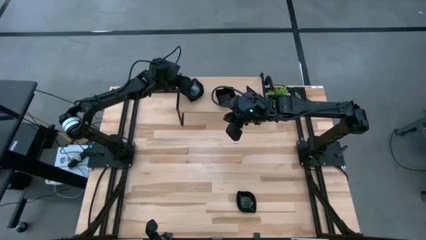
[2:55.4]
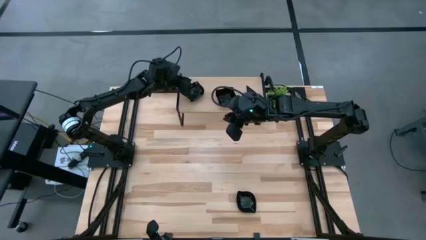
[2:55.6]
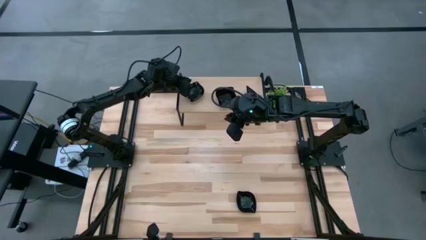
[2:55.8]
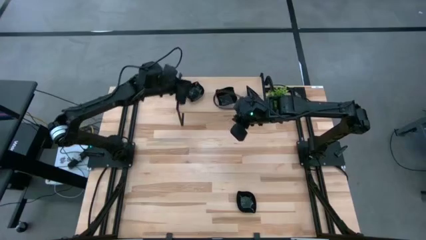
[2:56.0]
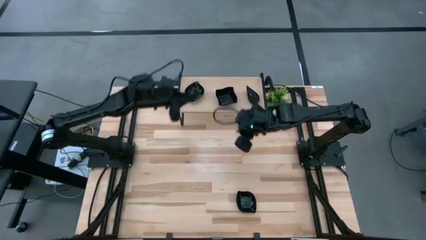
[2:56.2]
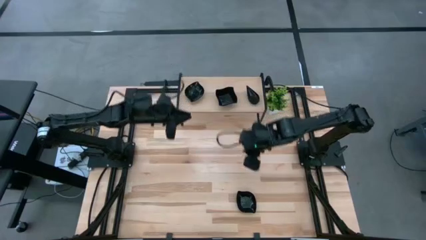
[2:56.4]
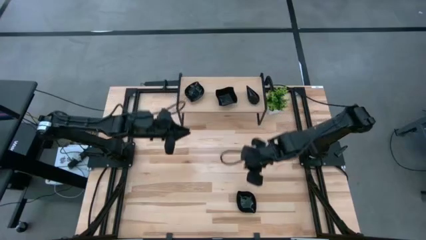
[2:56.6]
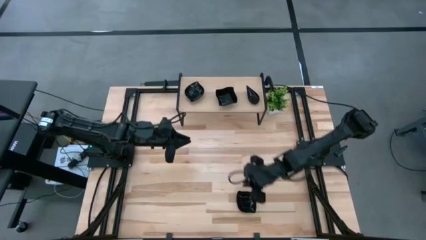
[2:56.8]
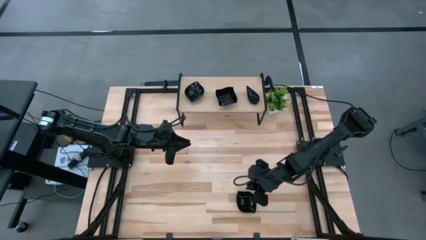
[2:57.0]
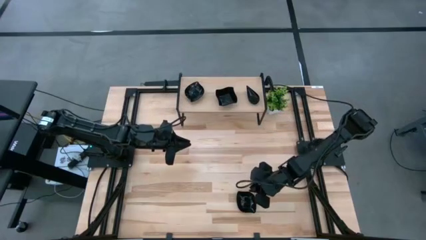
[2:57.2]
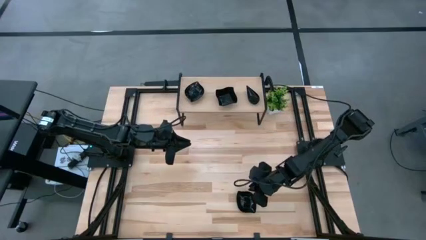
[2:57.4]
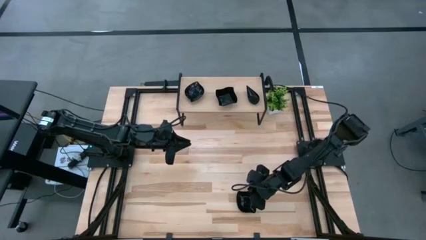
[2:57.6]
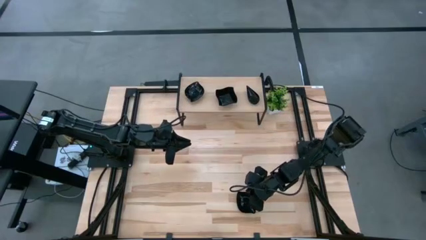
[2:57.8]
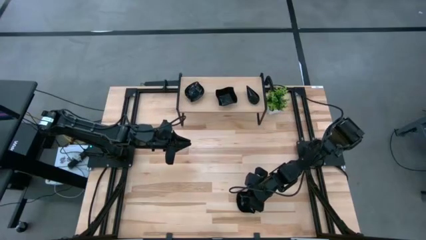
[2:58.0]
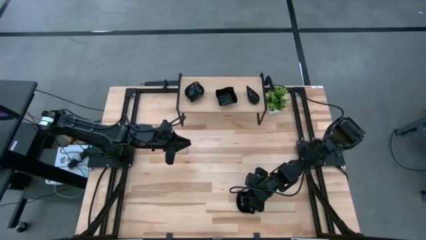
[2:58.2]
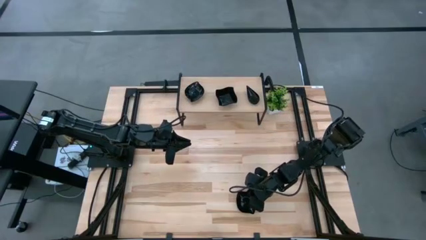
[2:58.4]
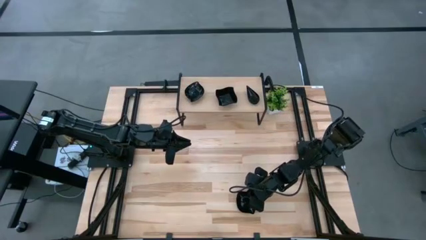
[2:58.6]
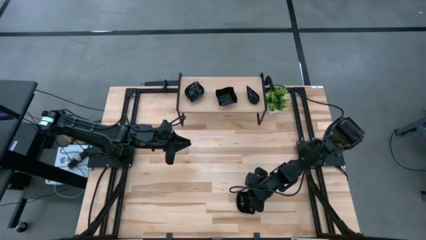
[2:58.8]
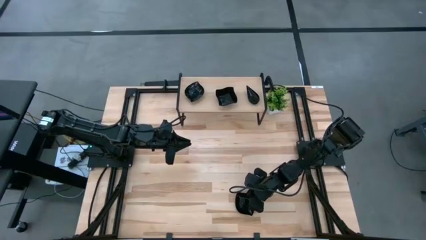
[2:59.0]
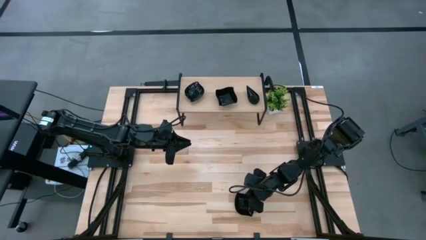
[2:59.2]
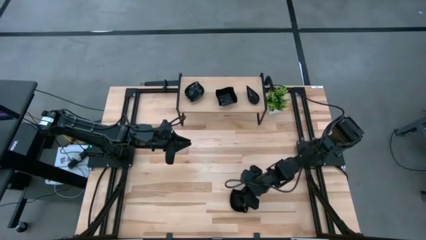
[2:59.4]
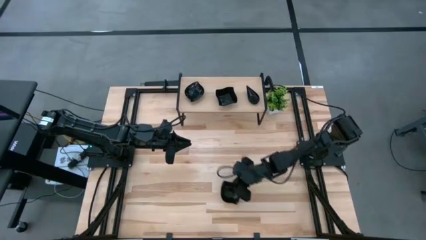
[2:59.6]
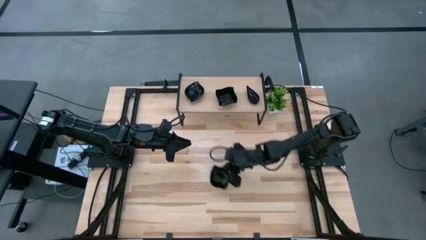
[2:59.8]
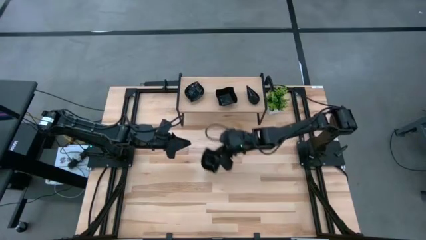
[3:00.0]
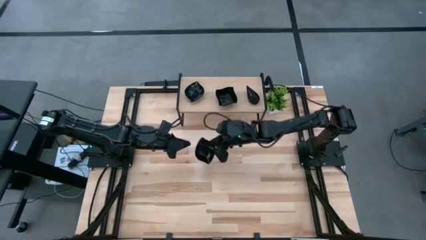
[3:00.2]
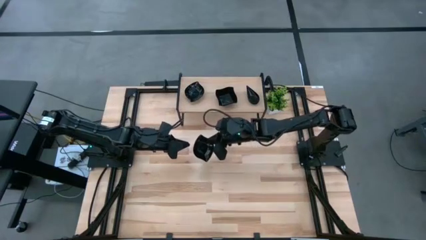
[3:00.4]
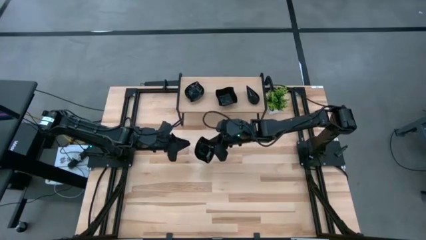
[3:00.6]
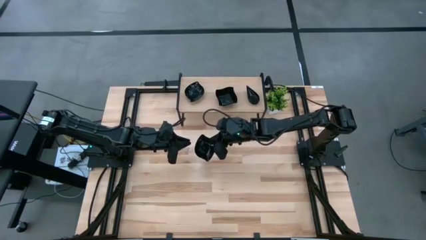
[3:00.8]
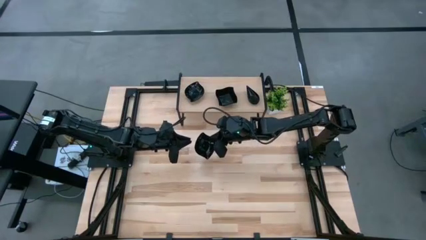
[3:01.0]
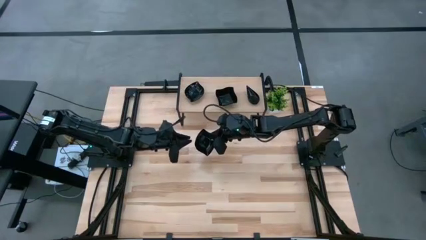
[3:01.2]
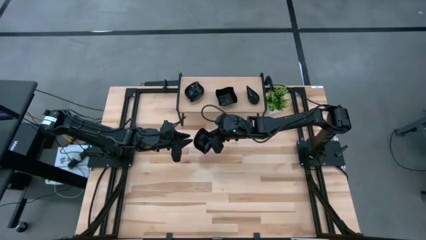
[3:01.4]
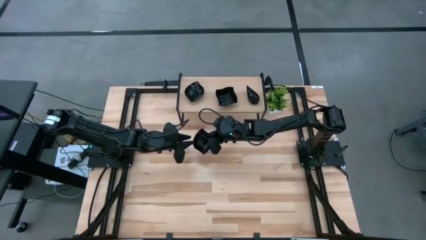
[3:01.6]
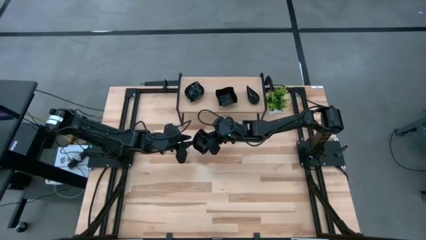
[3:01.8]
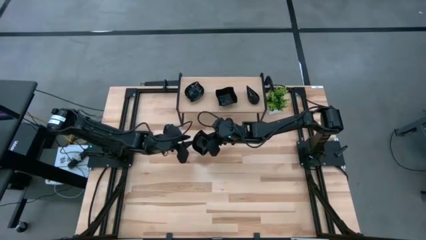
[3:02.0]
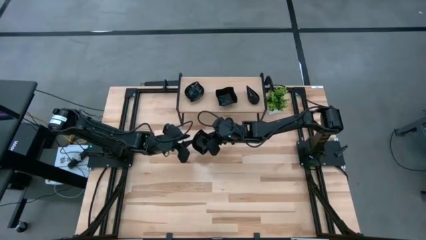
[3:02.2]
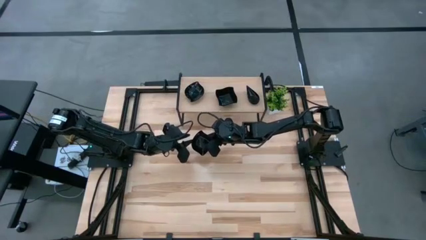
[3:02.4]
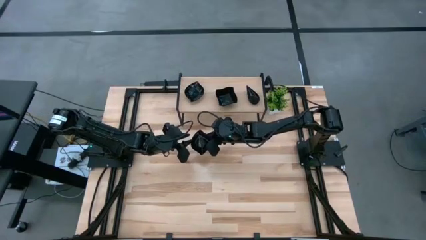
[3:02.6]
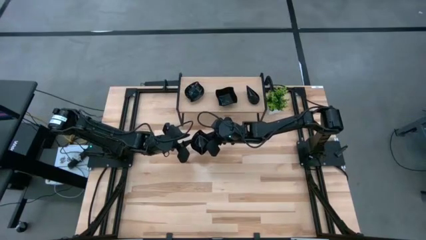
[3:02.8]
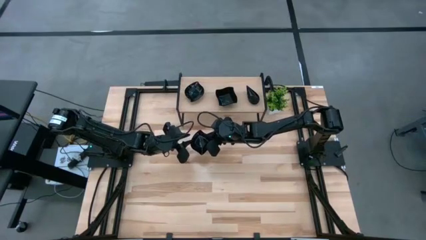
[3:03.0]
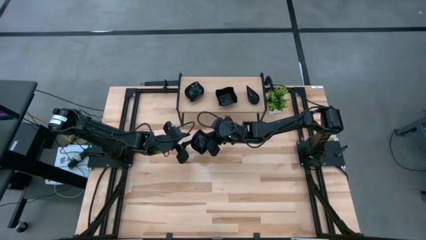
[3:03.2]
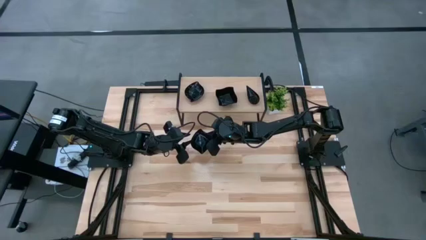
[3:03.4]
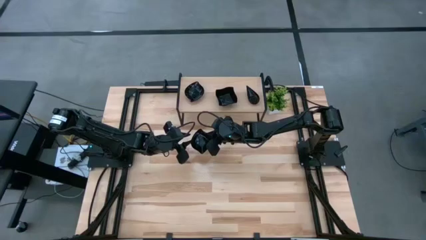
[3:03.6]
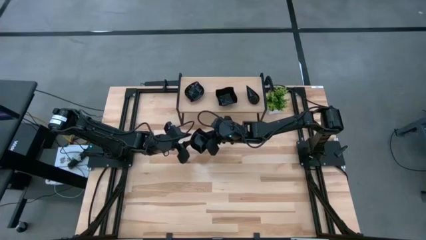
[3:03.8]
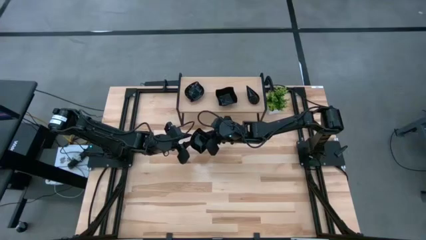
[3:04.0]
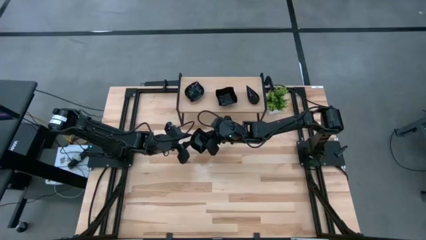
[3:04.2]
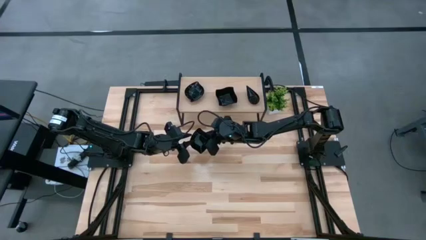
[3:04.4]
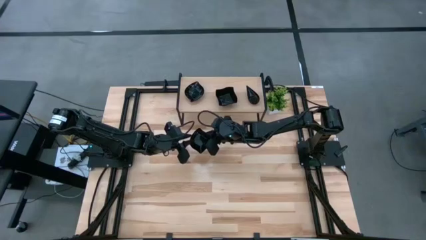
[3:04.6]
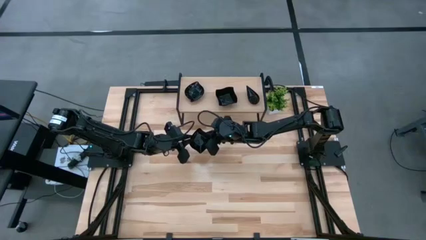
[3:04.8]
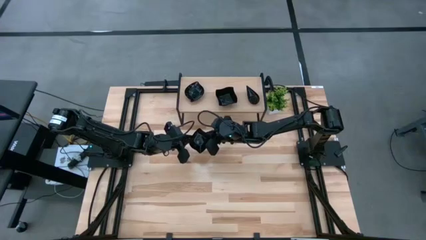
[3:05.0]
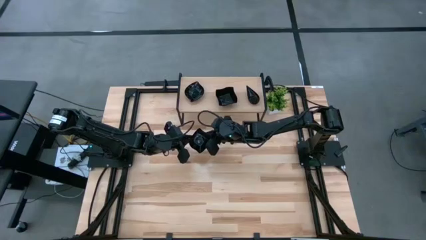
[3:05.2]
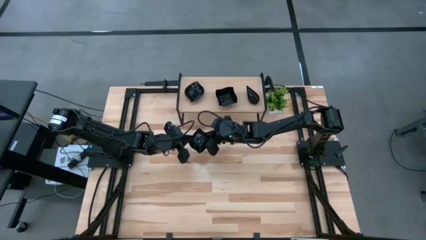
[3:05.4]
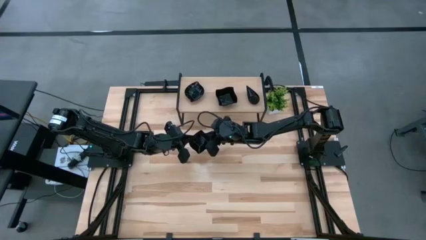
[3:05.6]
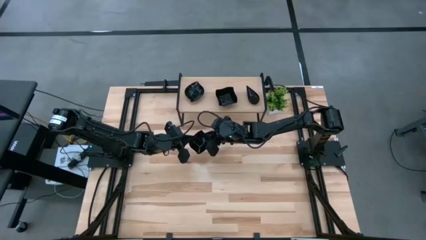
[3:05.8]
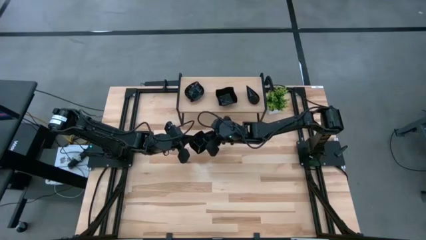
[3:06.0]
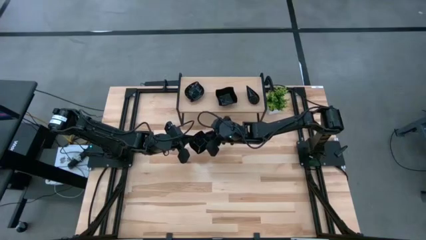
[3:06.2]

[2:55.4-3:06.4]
Task: Pick & Place Mini shaped plates
Stack the black leaf shaped plate on top of the black leaf shaped plate on the shelf
